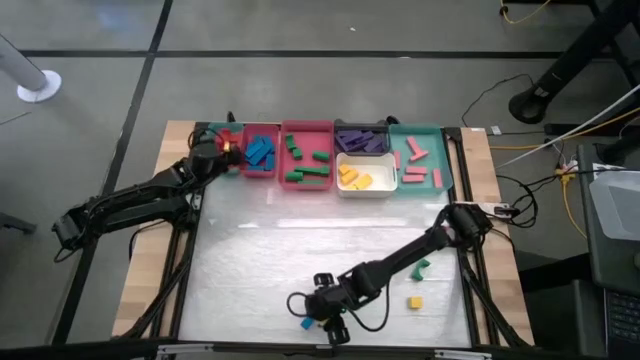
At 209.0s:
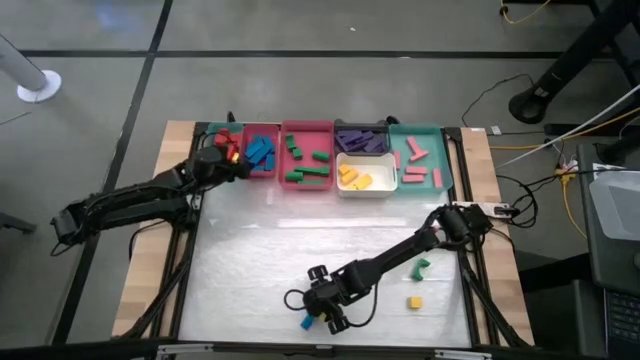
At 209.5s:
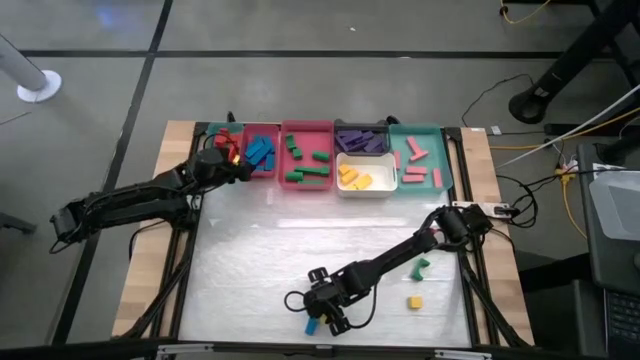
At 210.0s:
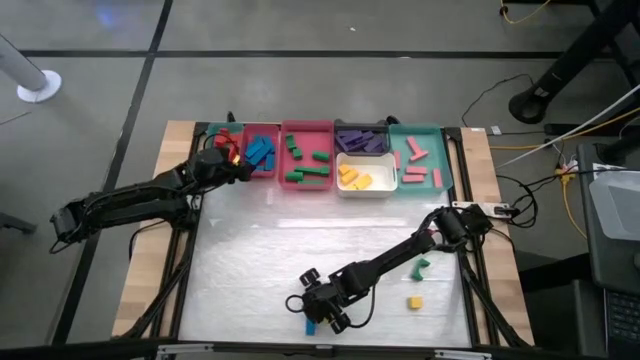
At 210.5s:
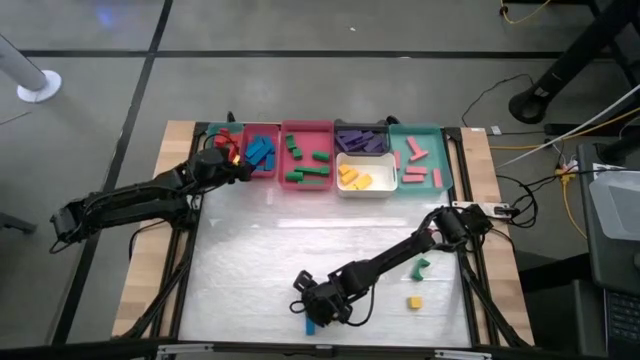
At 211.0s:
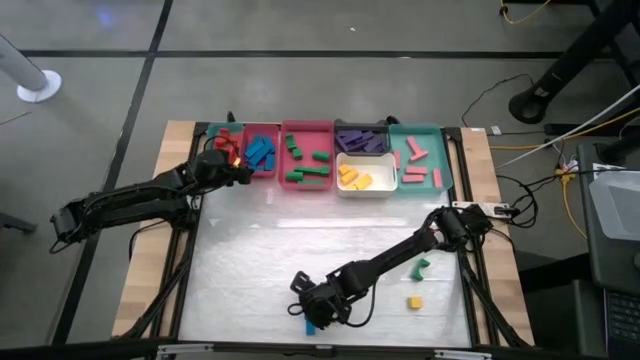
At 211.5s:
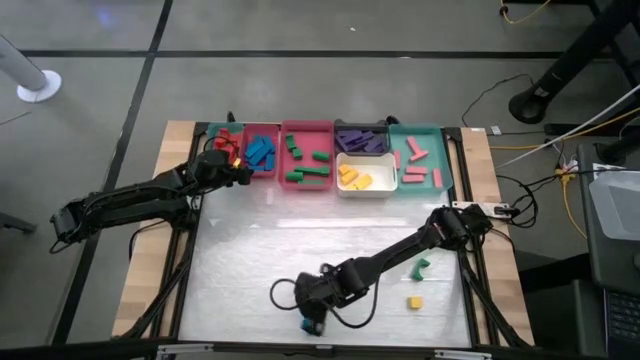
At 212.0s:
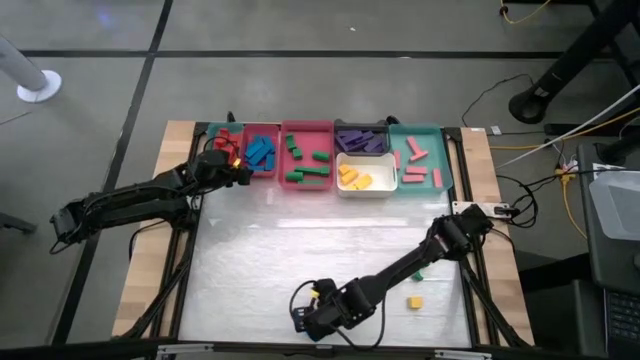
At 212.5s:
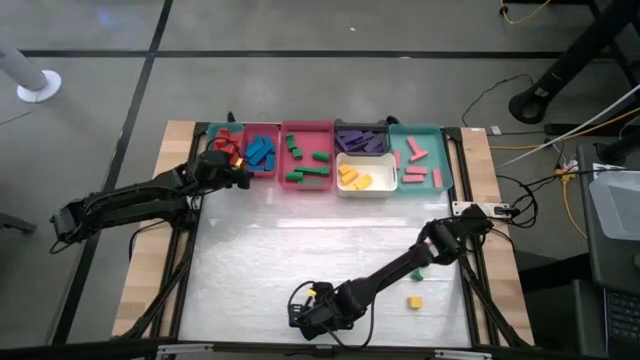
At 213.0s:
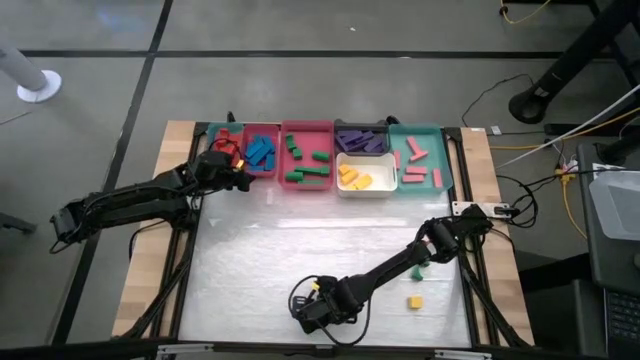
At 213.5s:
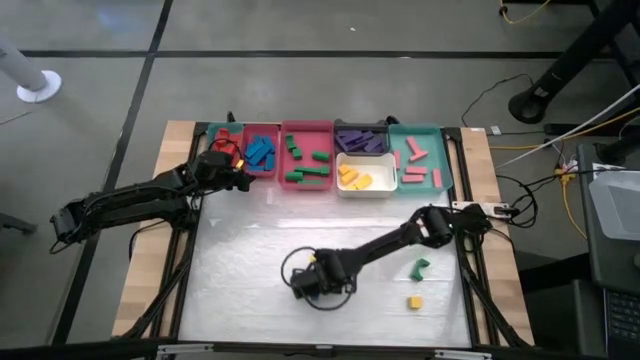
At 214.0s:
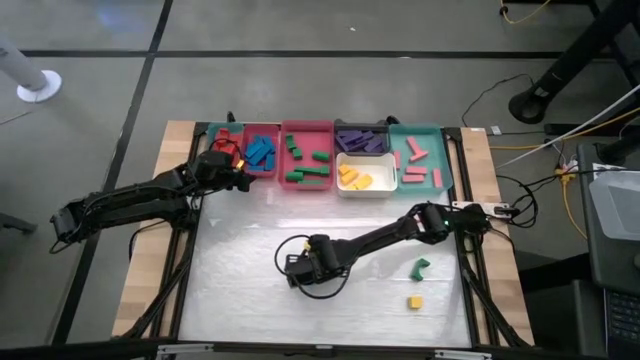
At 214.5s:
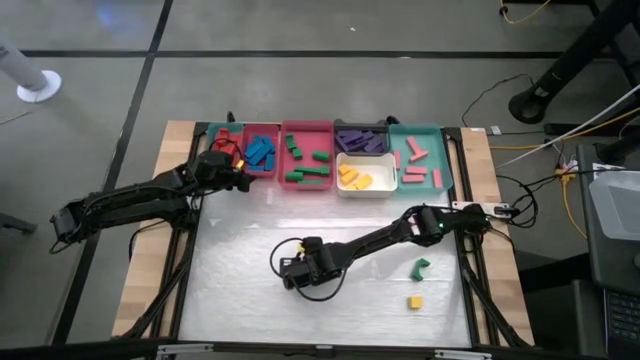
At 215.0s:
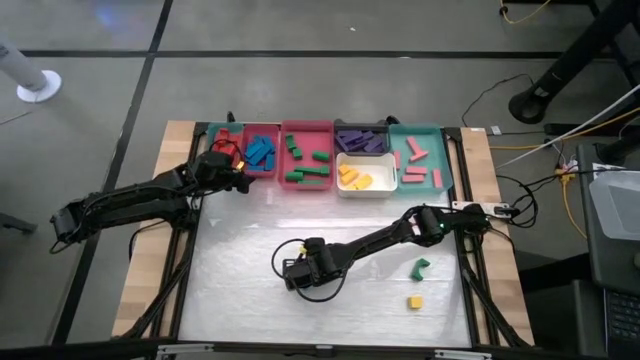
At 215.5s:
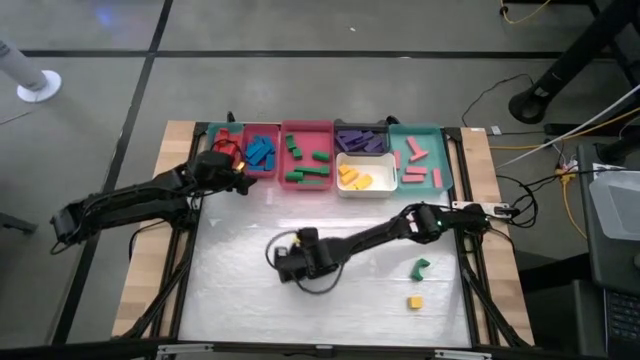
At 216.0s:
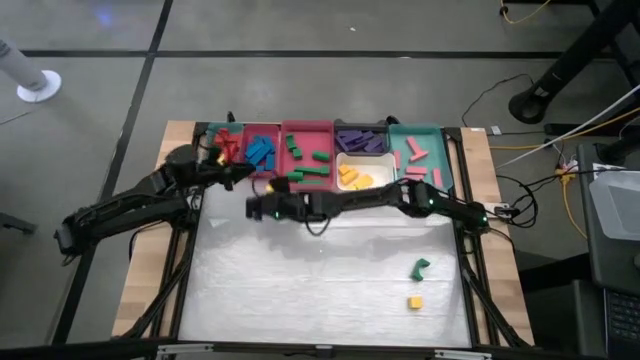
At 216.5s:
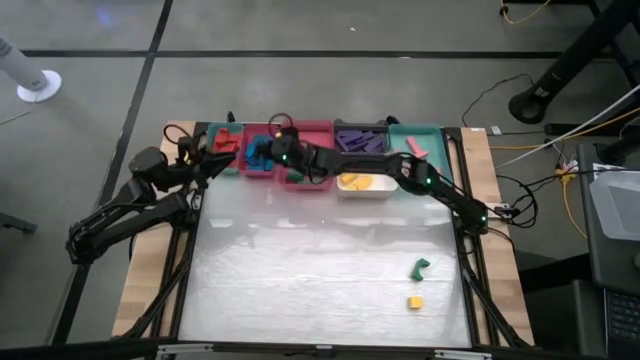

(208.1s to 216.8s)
Task: Sort blocks
Put the blue block into the left pink bin

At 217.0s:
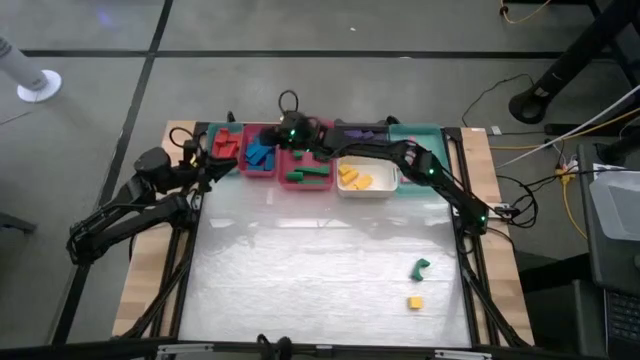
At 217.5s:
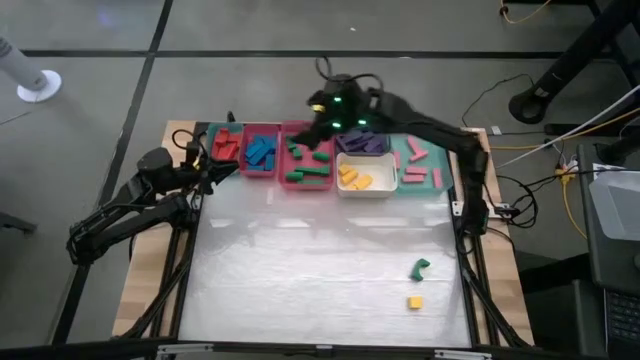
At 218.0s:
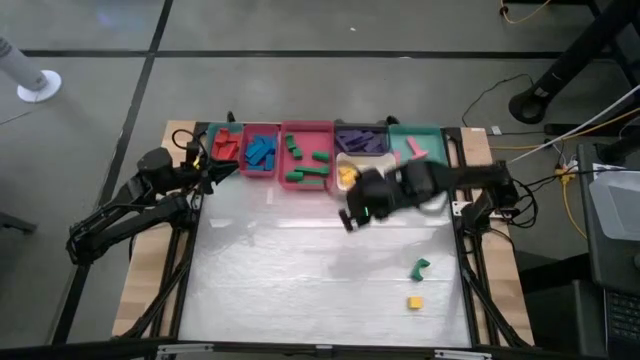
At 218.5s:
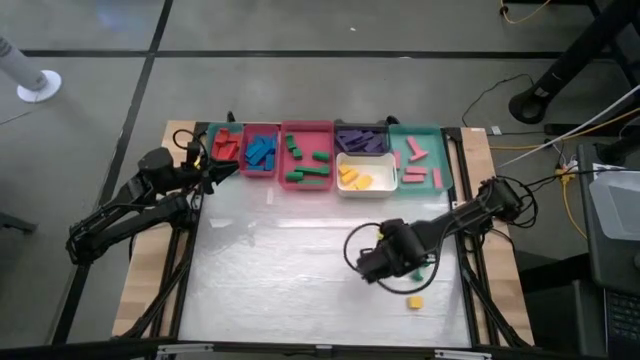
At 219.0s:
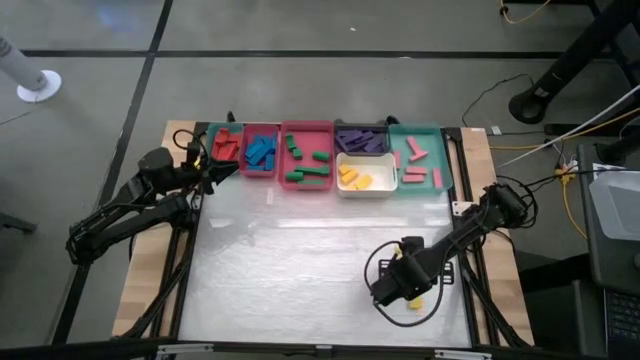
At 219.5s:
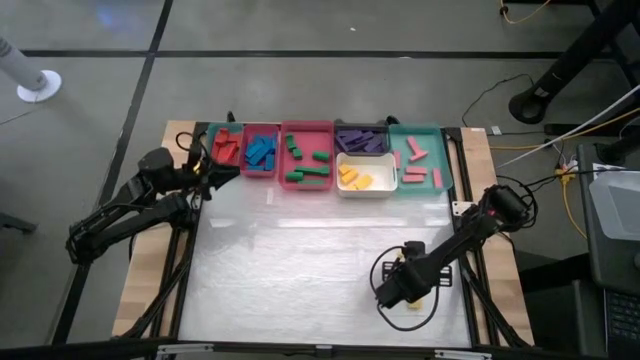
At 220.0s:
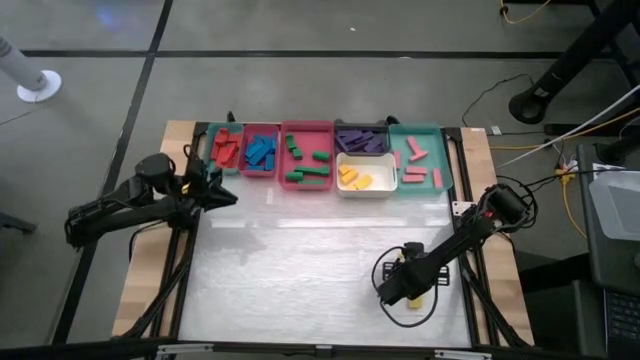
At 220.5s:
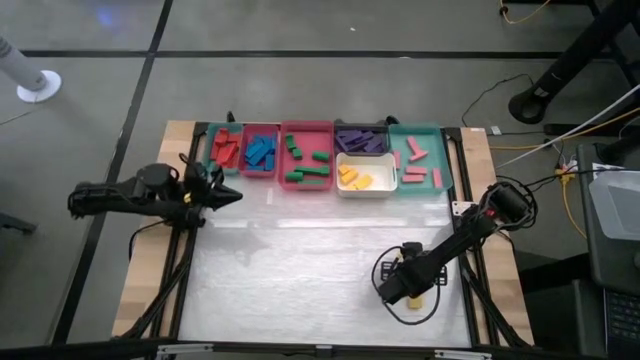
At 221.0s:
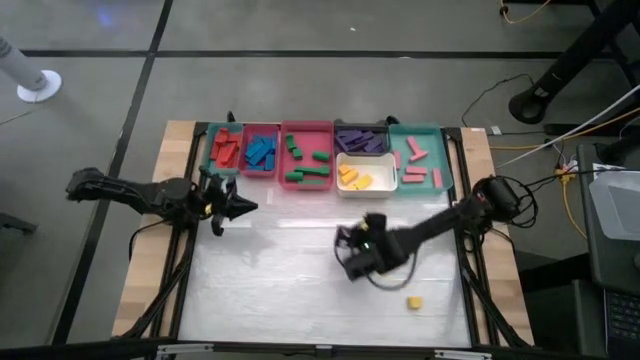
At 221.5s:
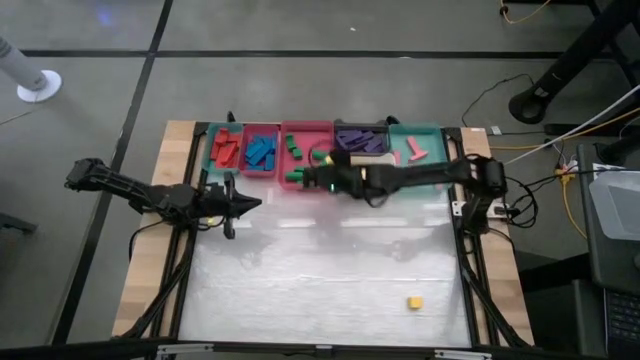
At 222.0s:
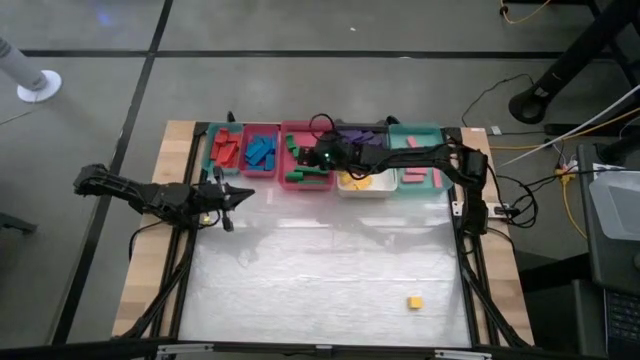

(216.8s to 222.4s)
Put the green block into the right pink bin

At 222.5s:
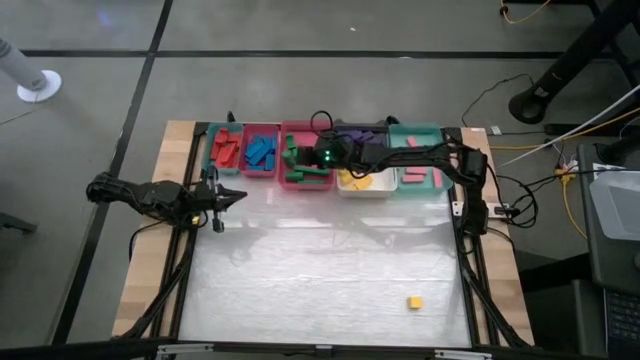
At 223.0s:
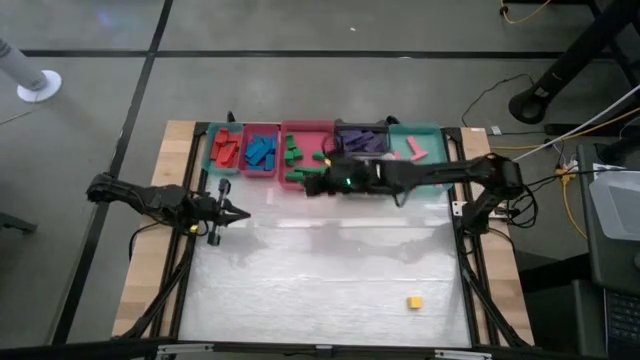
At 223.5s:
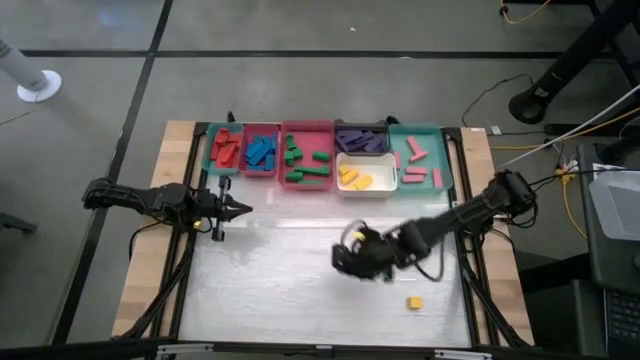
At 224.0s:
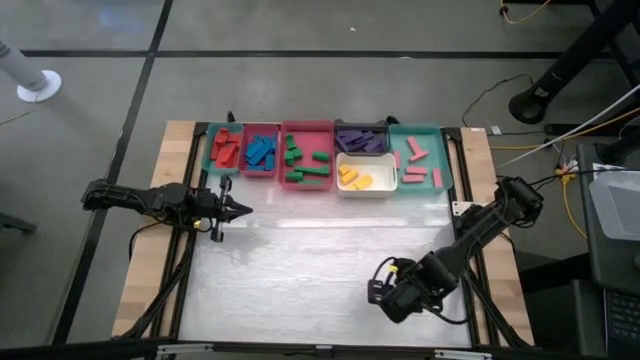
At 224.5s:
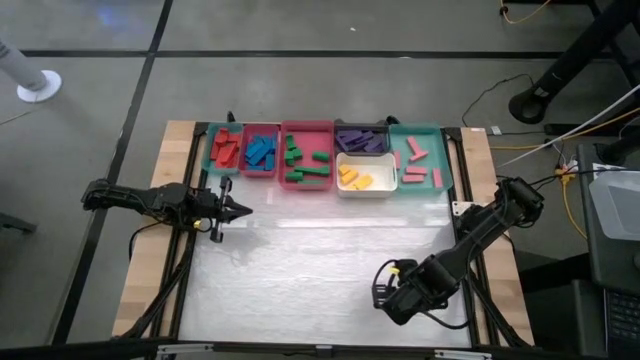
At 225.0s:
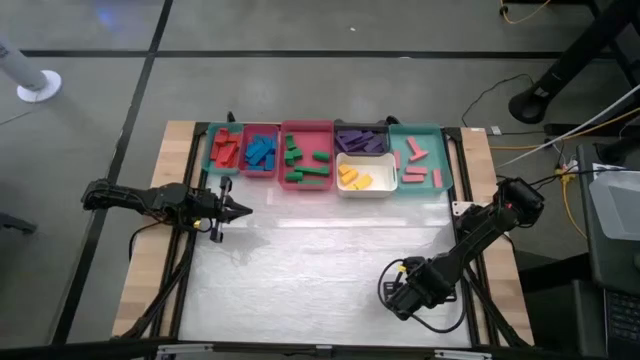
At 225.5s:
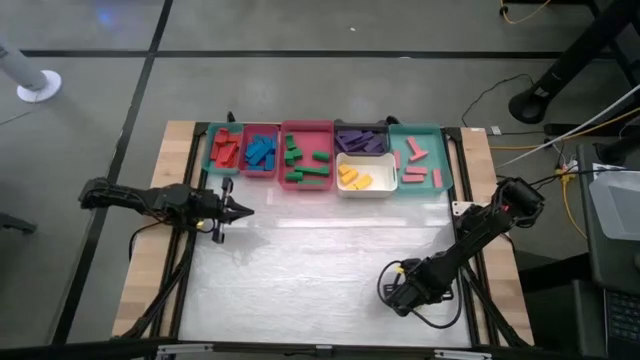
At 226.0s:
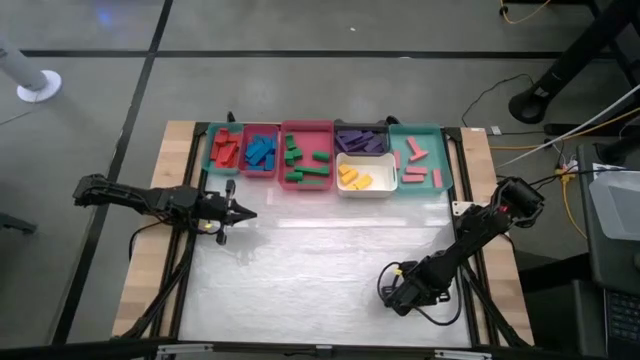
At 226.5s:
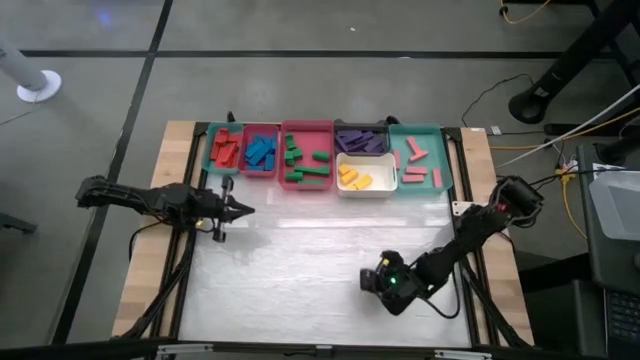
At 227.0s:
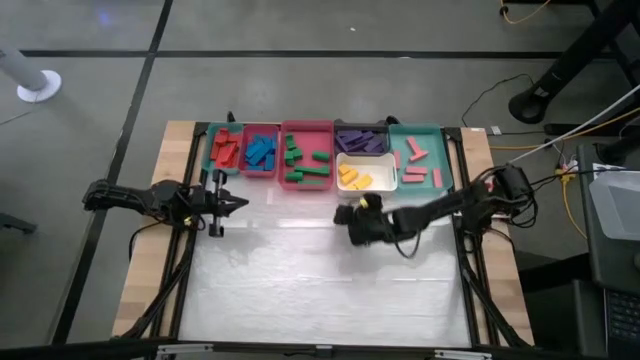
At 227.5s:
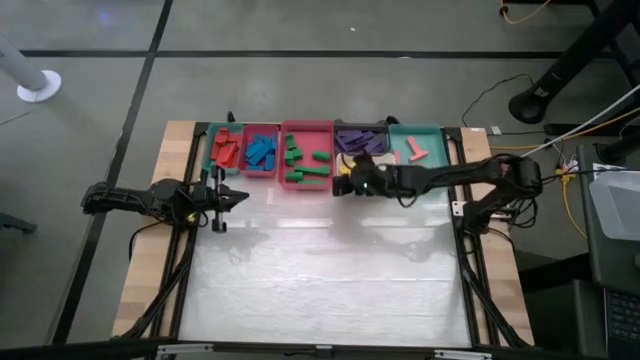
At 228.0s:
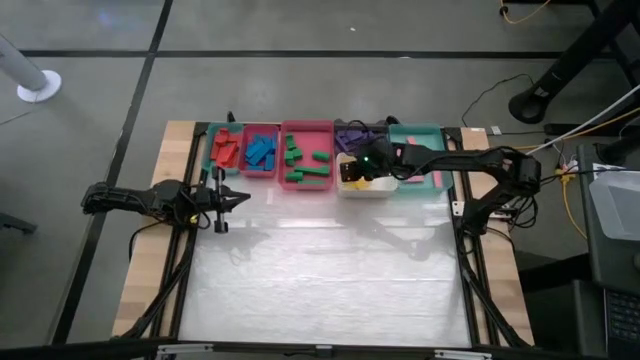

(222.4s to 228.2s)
Put the yellow block into the white bin
